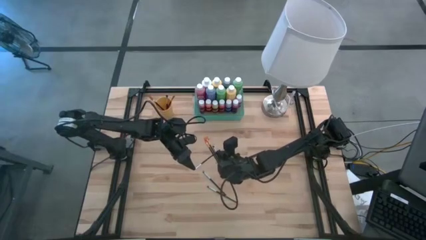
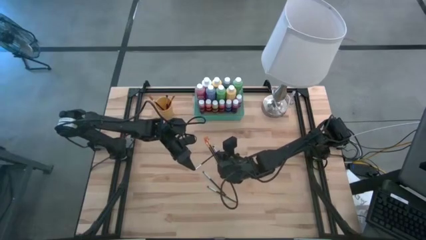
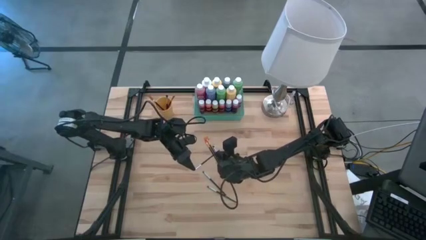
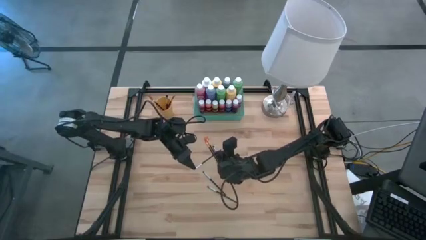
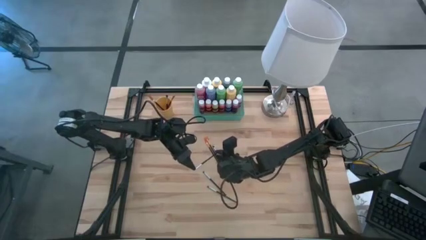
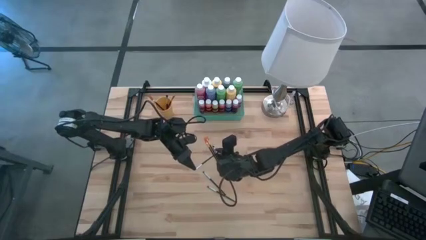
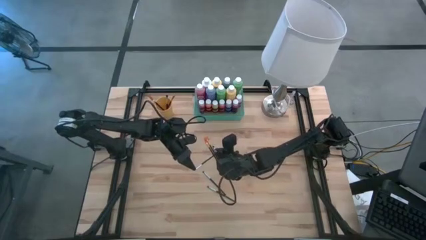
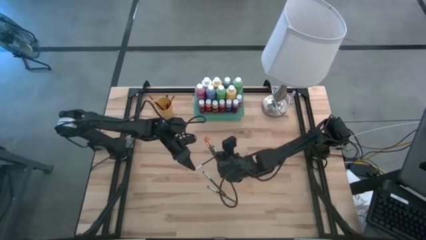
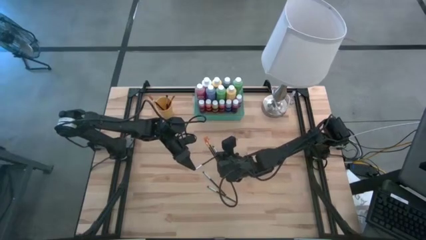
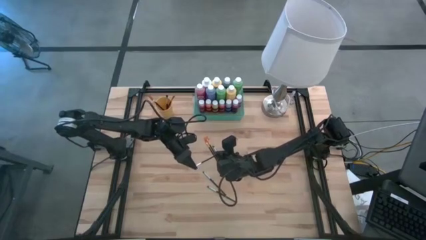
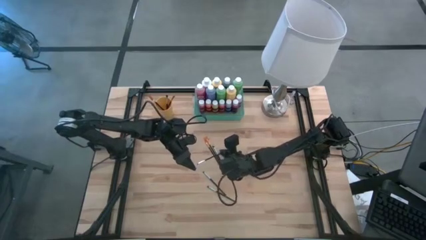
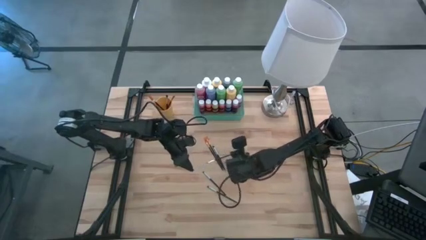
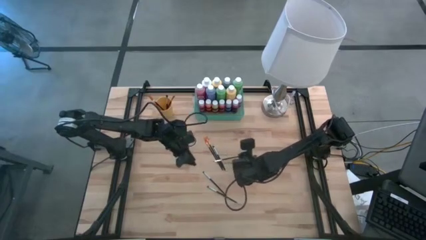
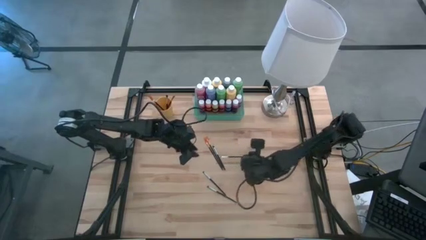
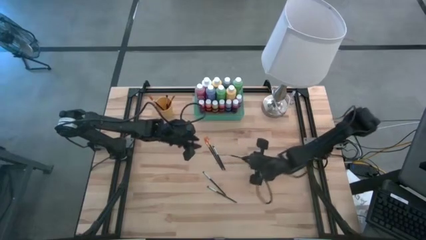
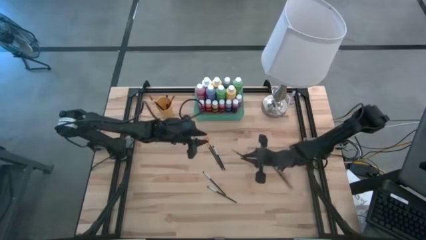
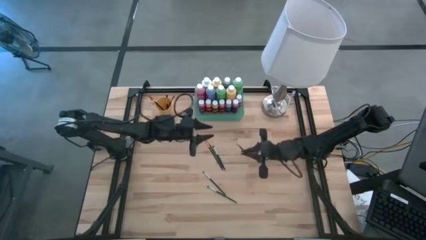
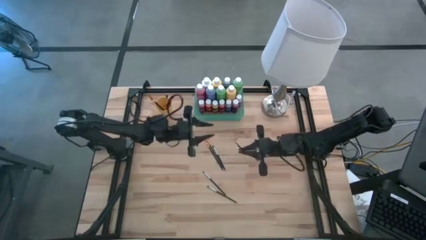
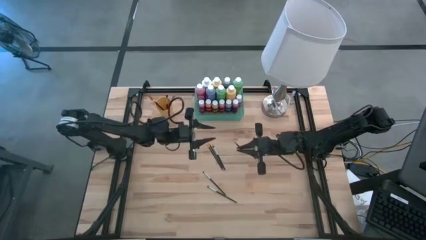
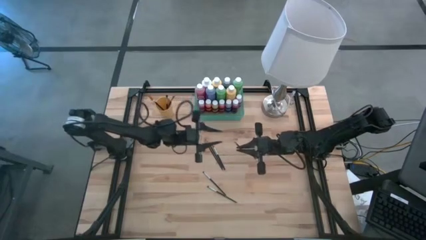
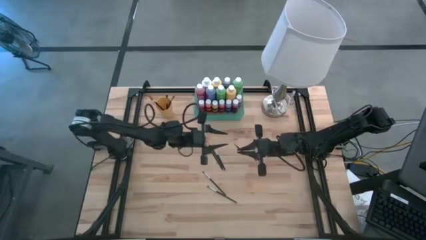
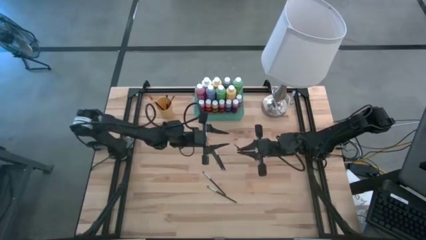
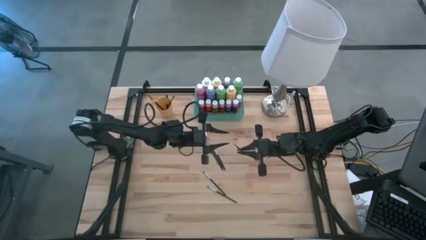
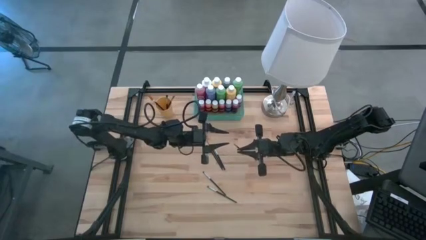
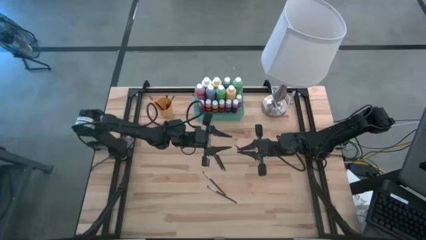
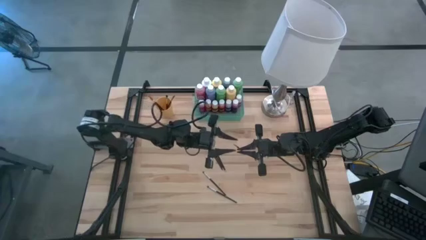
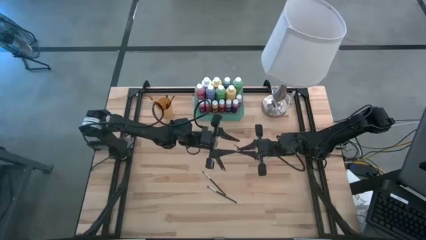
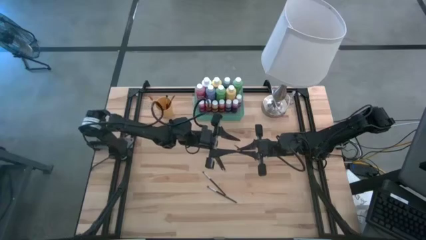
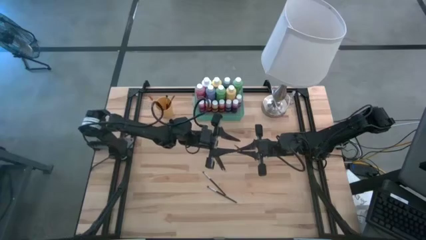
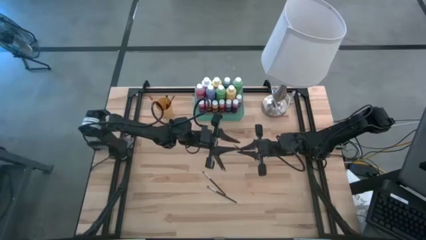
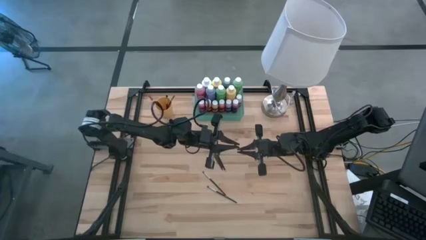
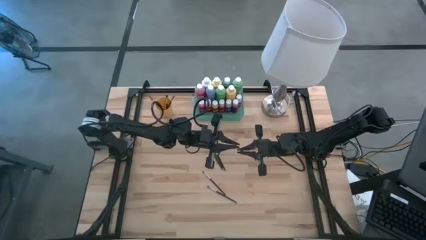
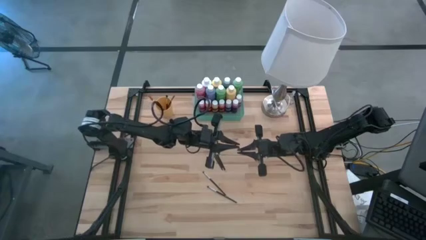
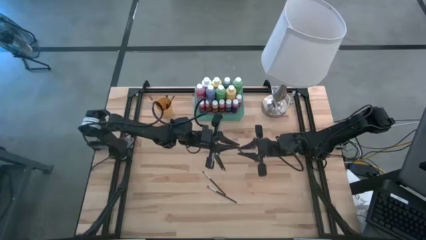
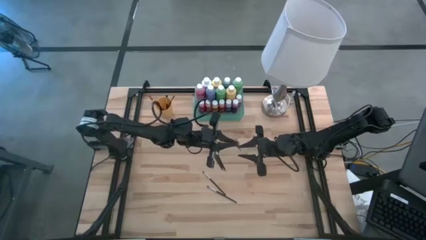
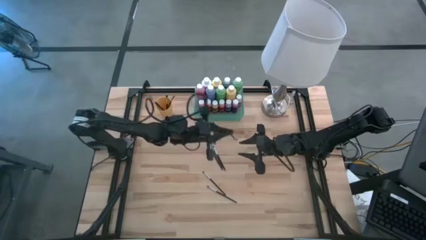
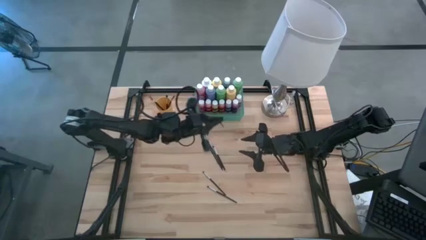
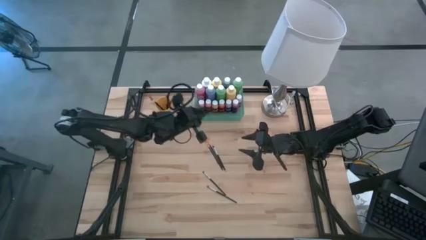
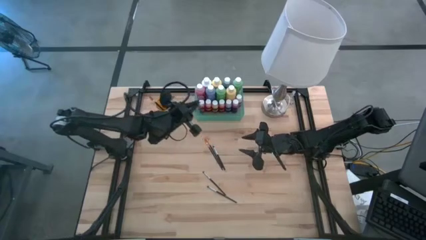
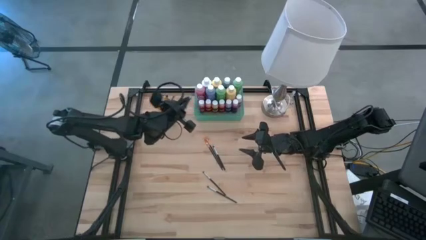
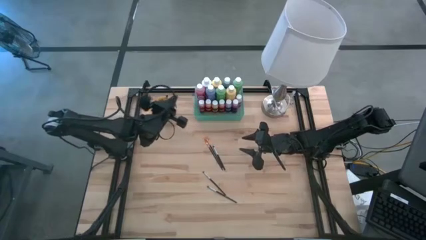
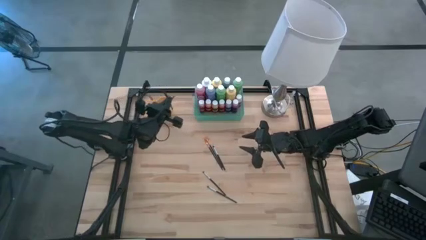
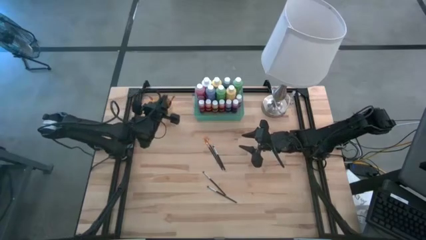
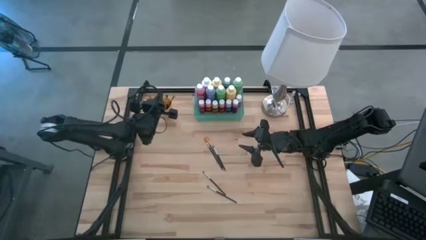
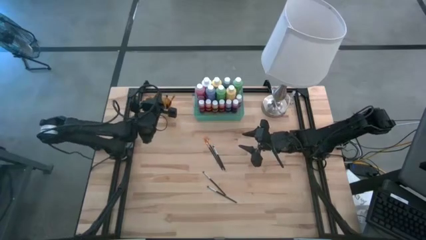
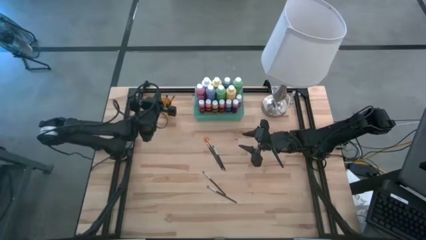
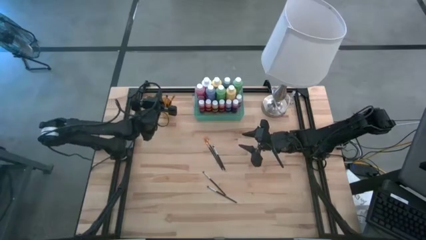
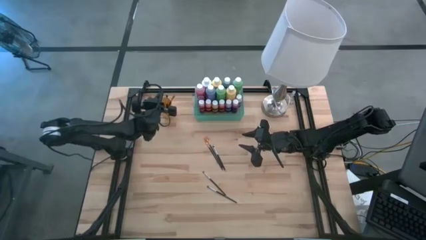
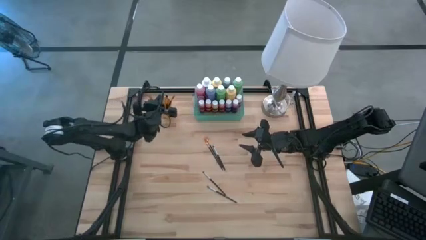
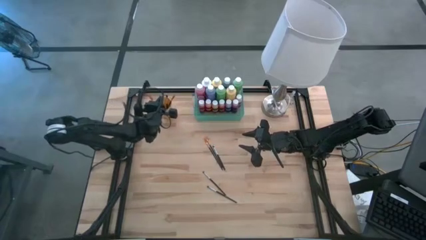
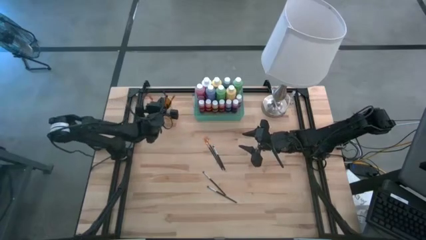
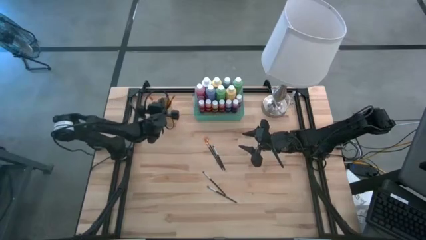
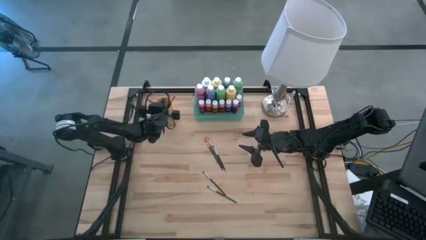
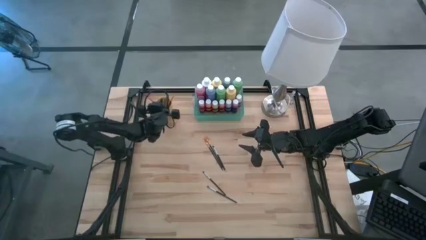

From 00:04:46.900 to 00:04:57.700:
Task: Pick & Place Paint Supplies
Put the silver paintbrush into the orange cup

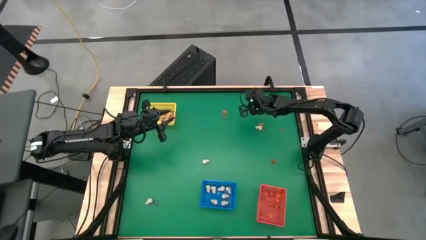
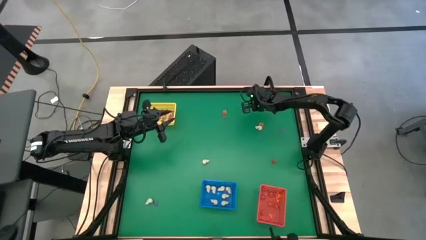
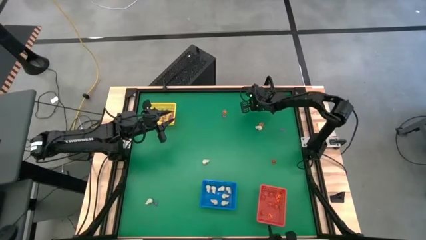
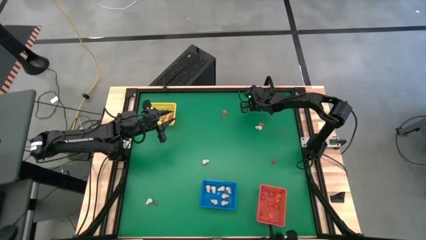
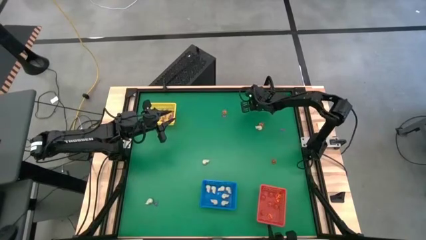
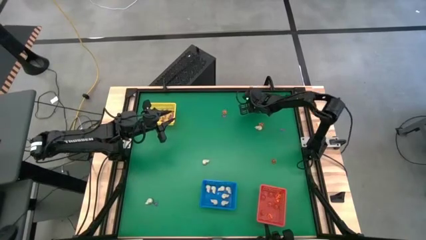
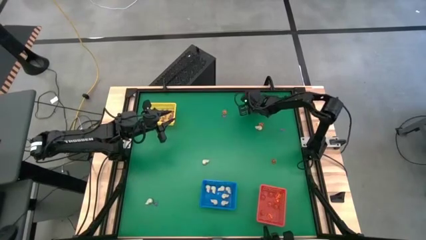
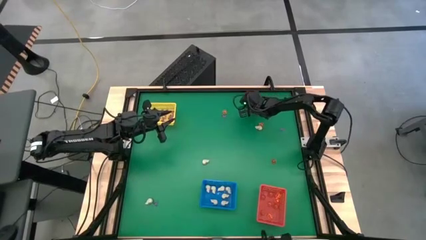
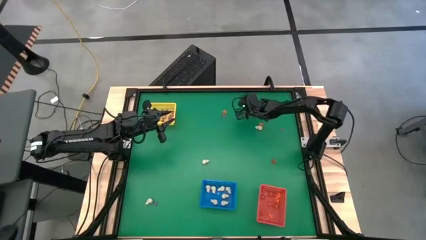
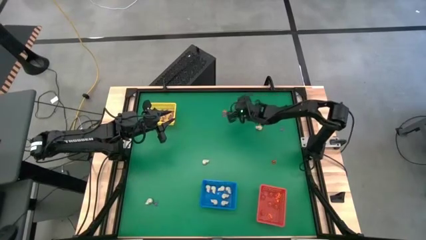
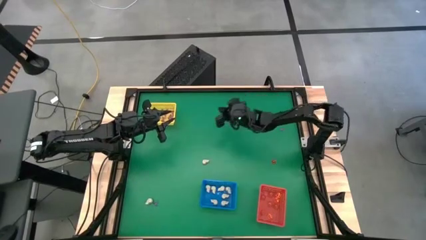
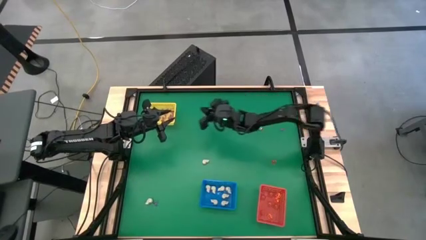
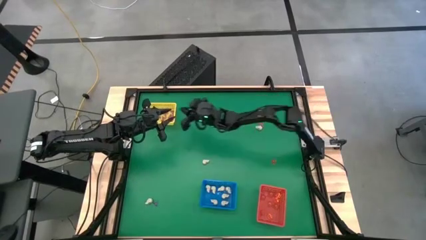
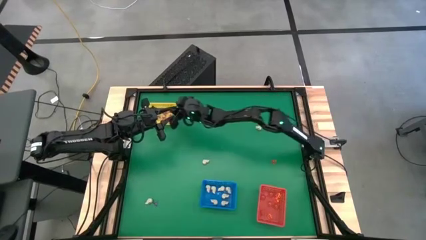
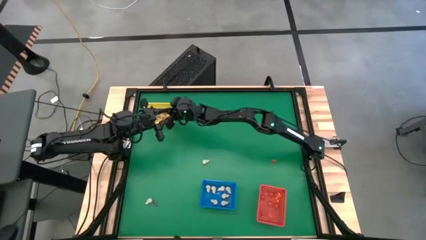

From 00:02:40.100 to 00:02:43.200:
Task: Sort Halloween decoration
Put the purple witch hat toy into the yellow basket

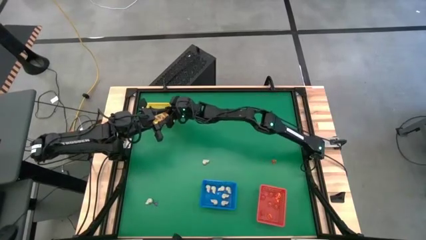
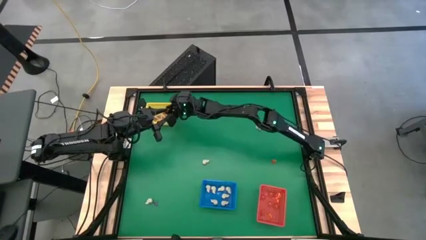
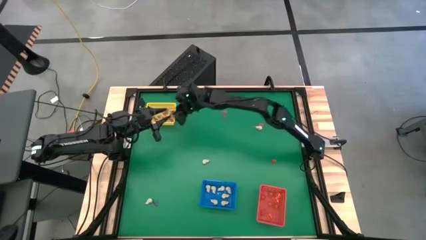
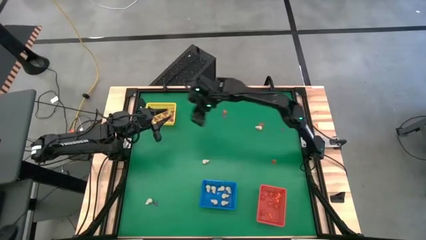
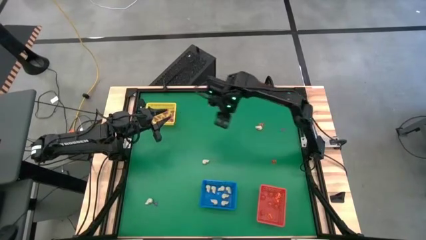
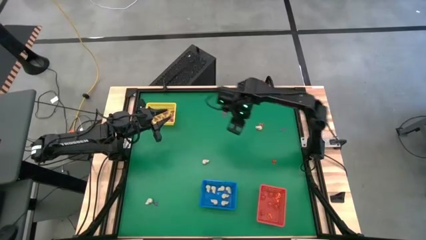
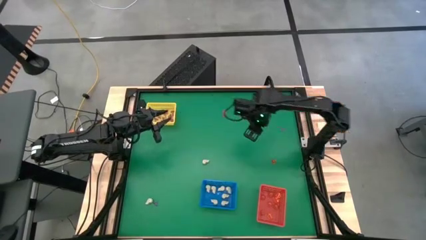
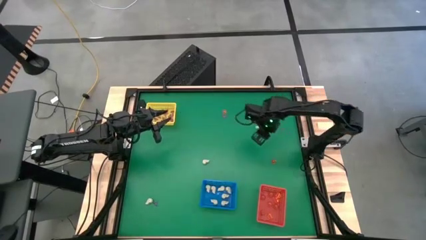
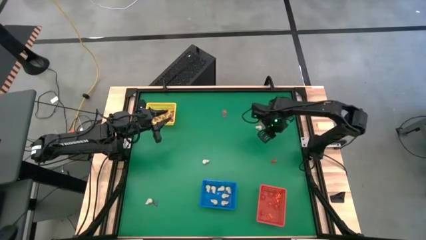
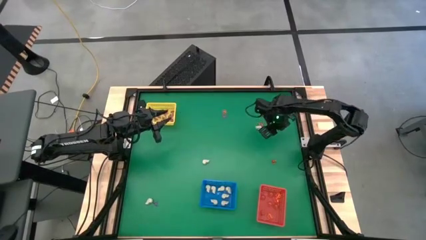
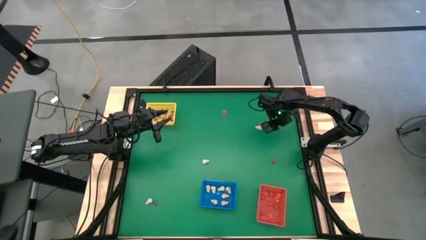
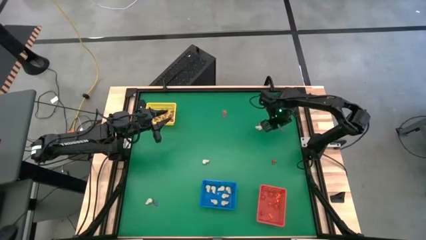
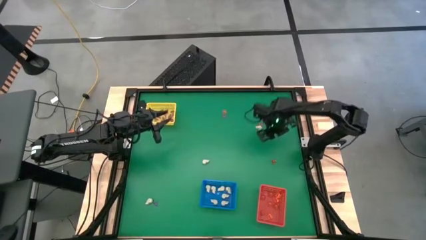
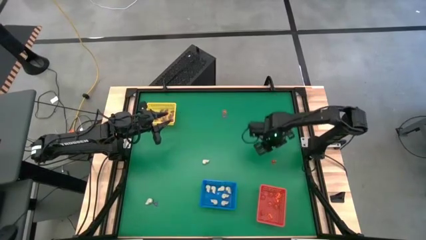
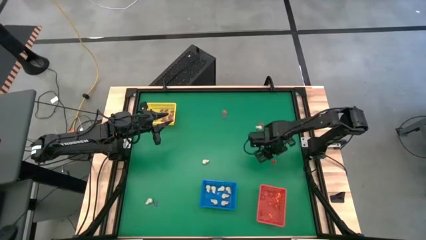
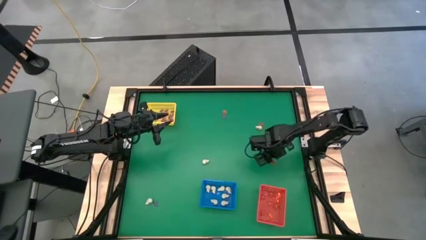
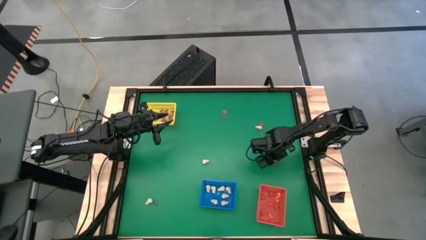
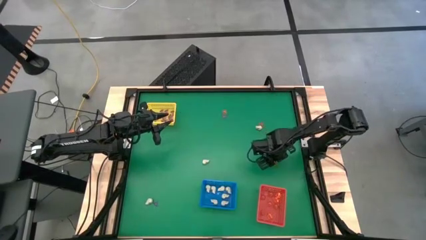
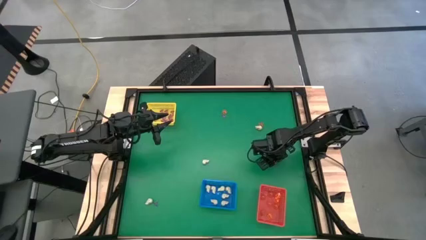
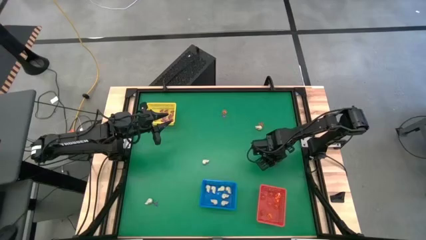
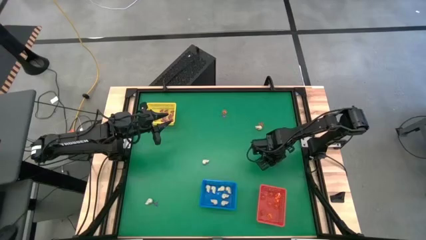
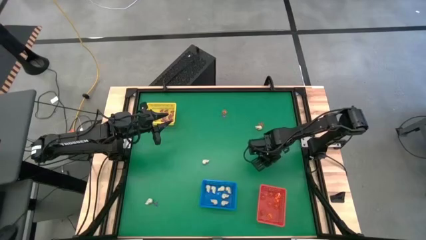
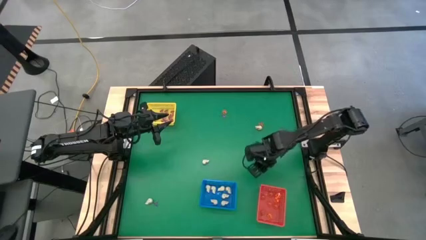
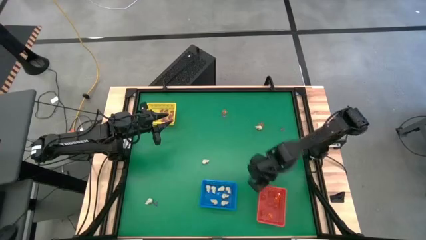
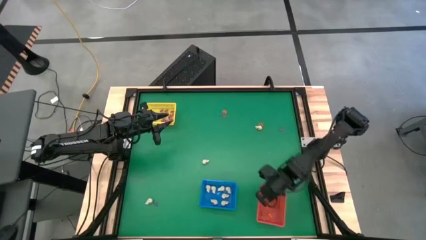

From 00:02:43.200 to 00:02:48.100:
Put the orange pumpkin toy into the orange basket
